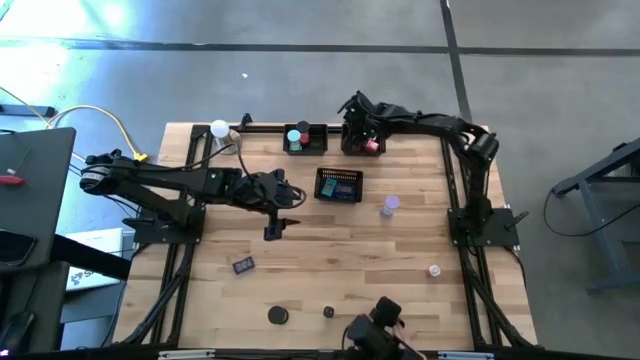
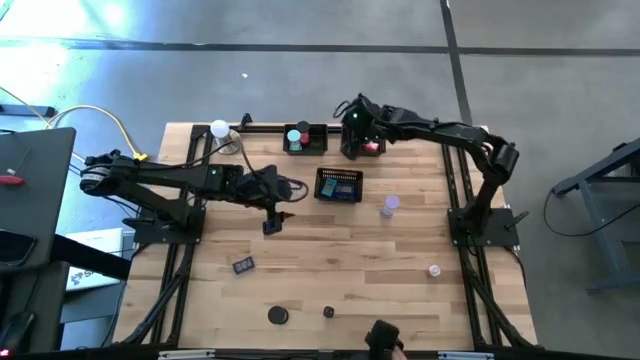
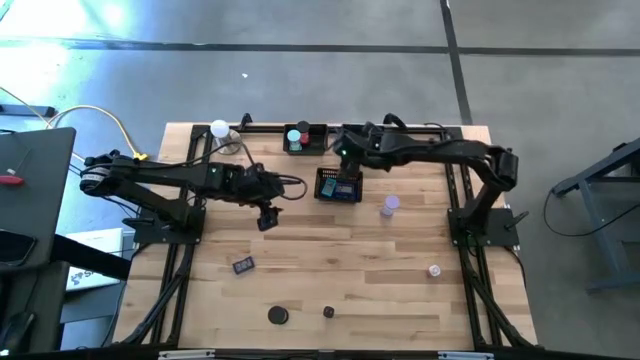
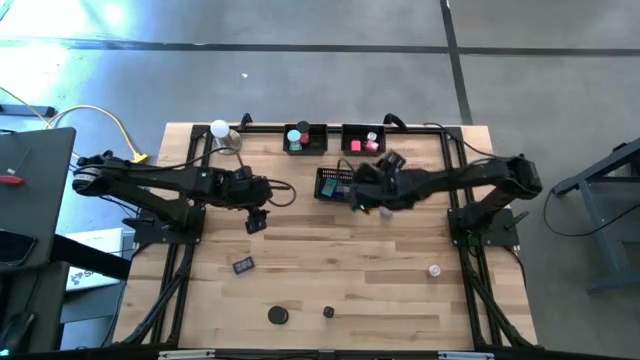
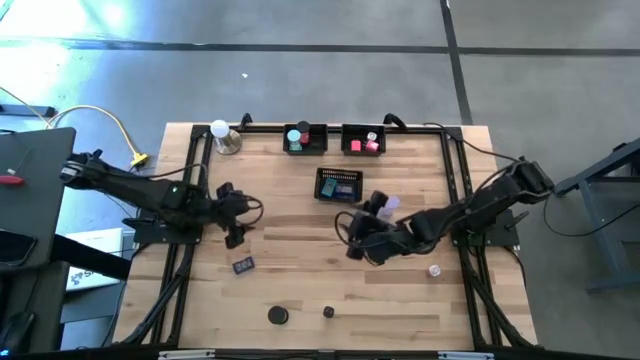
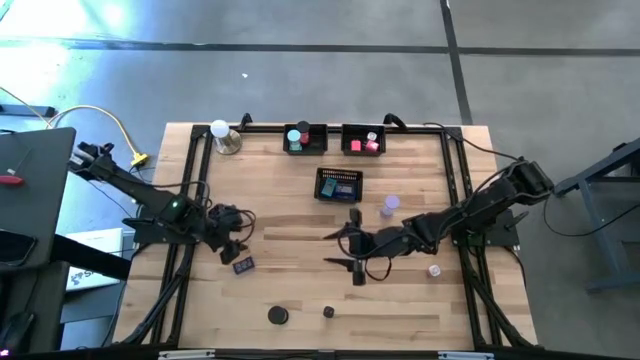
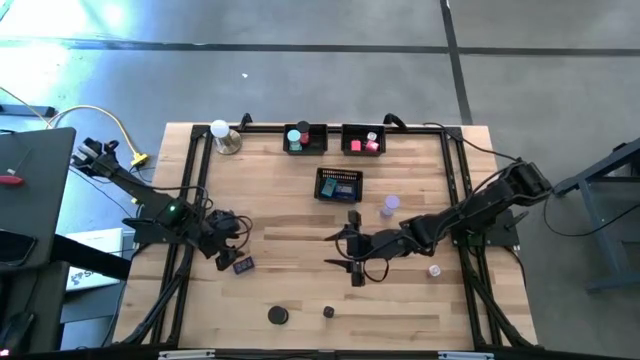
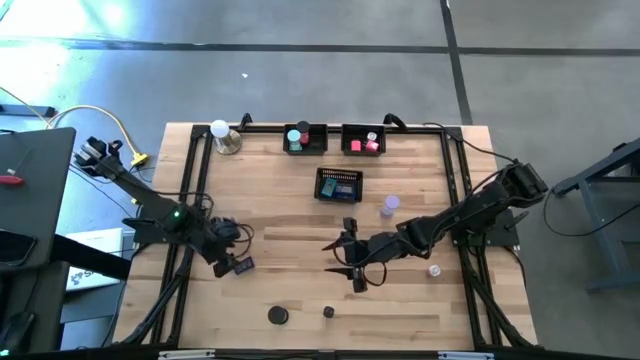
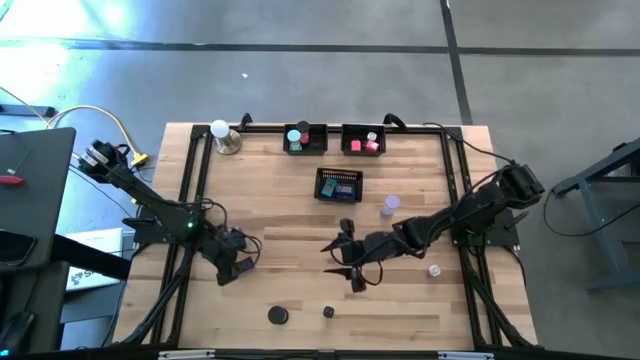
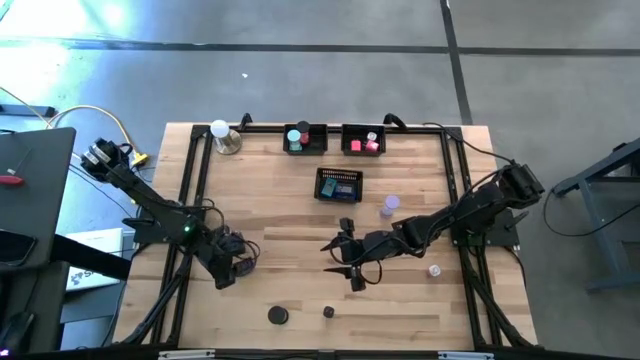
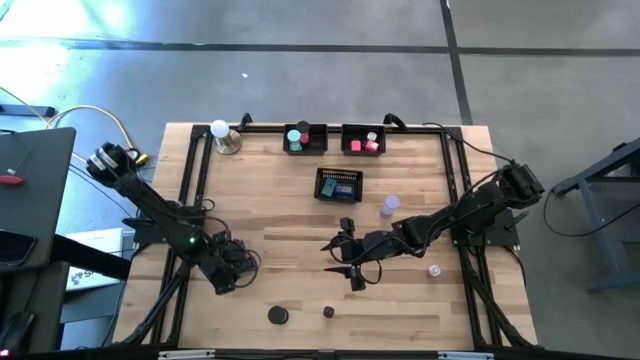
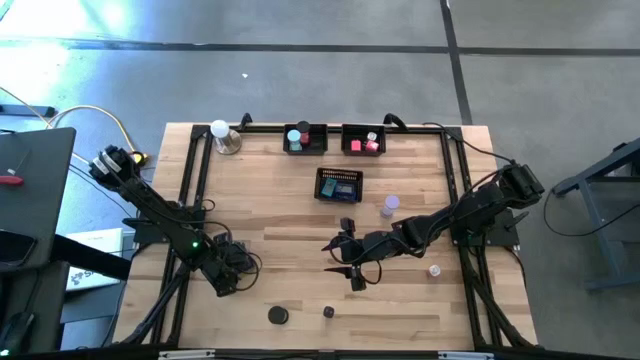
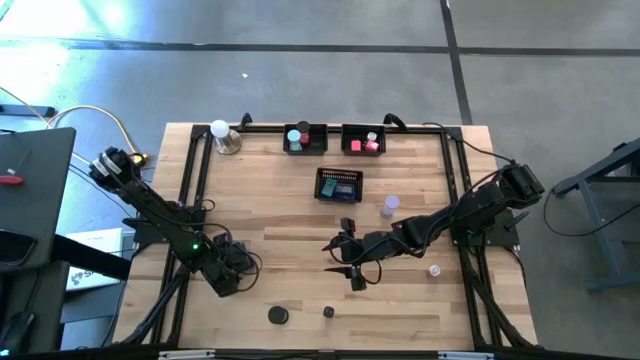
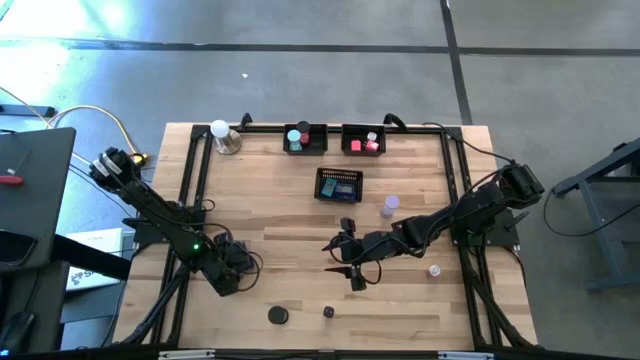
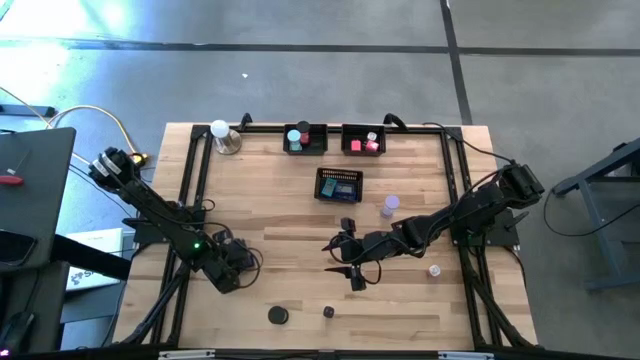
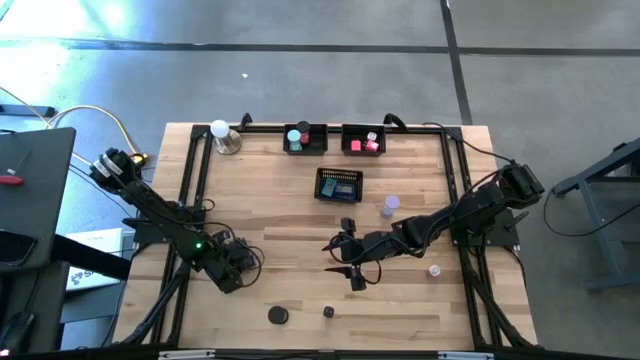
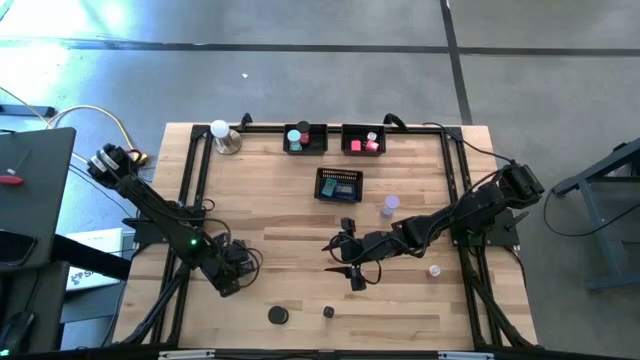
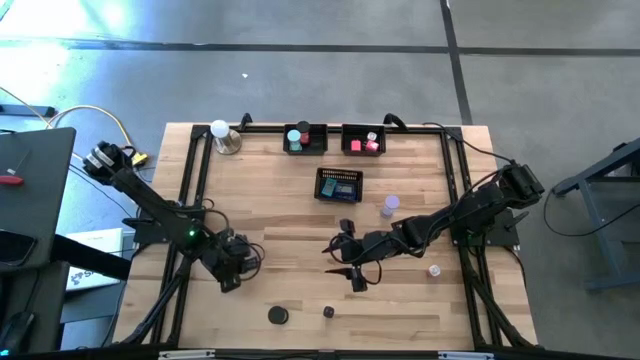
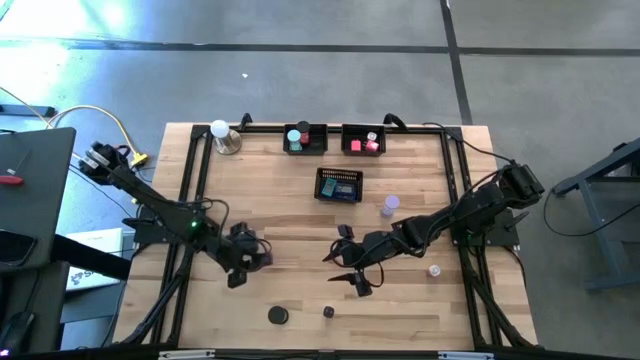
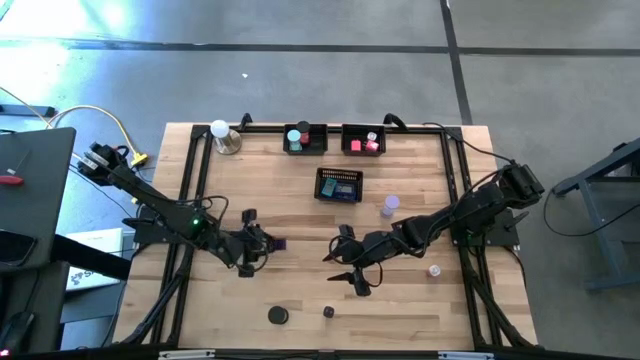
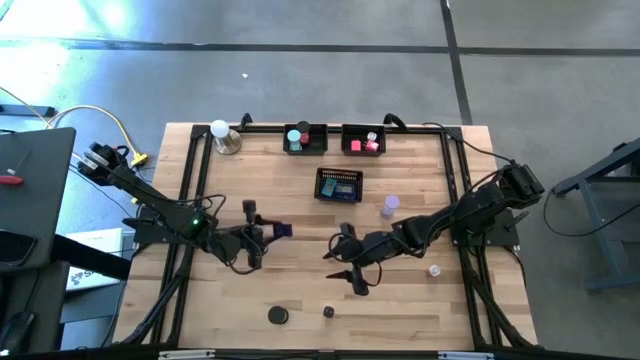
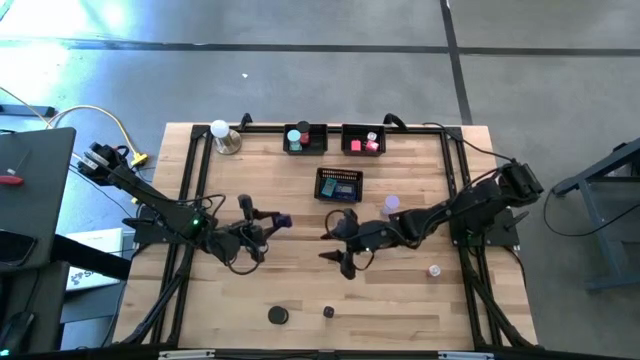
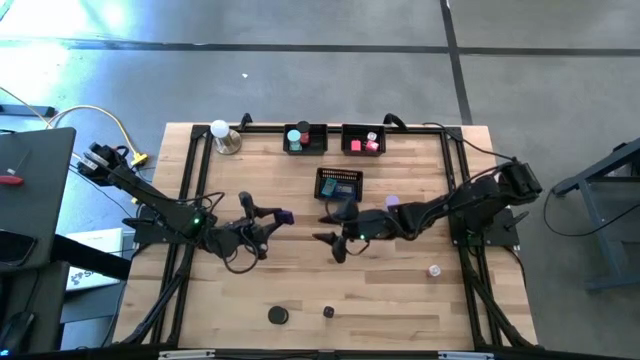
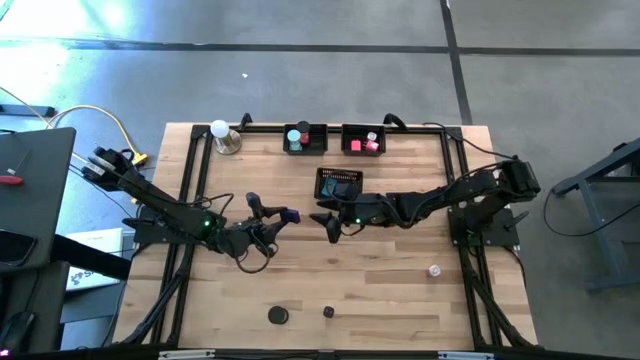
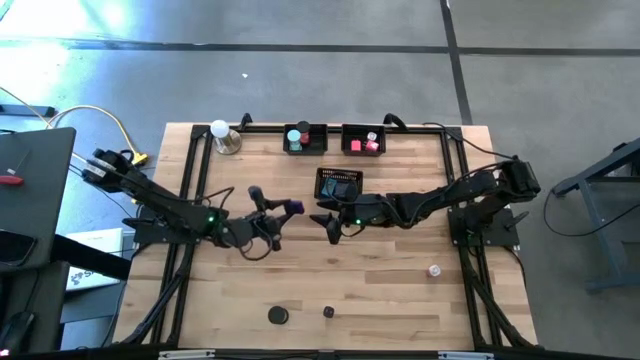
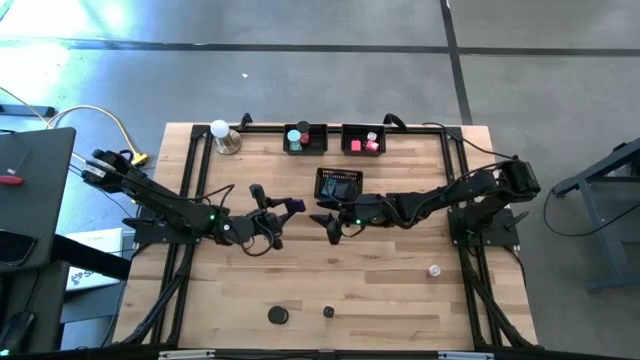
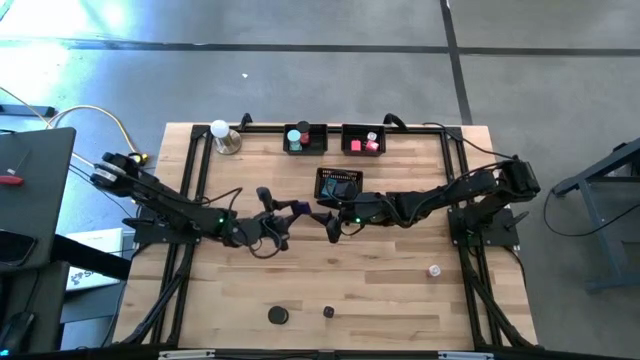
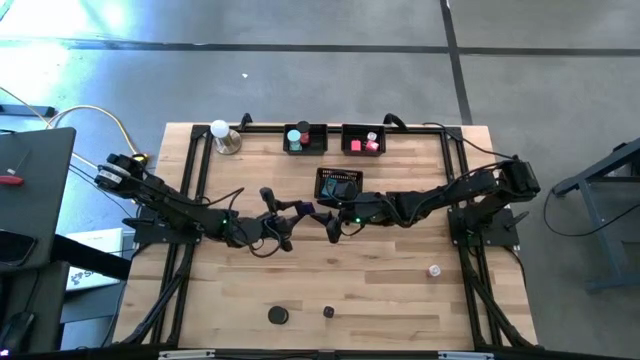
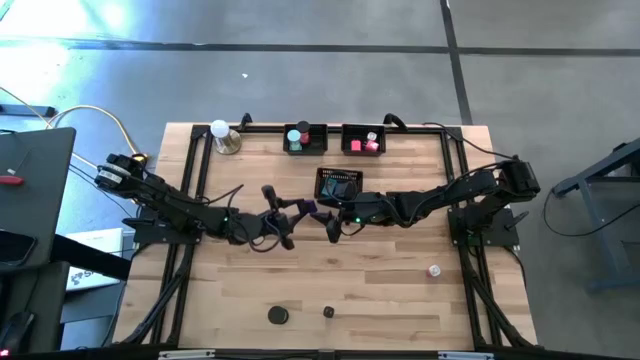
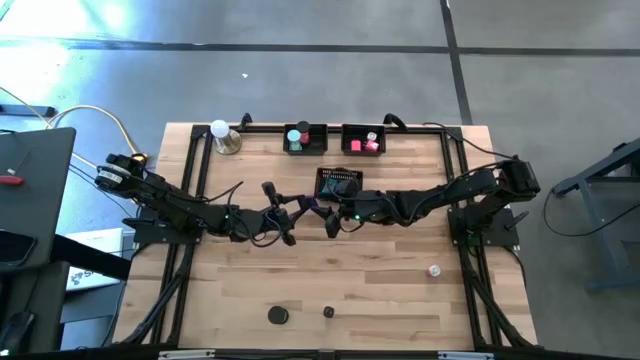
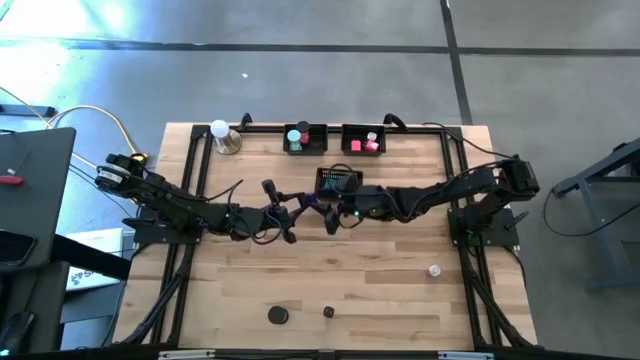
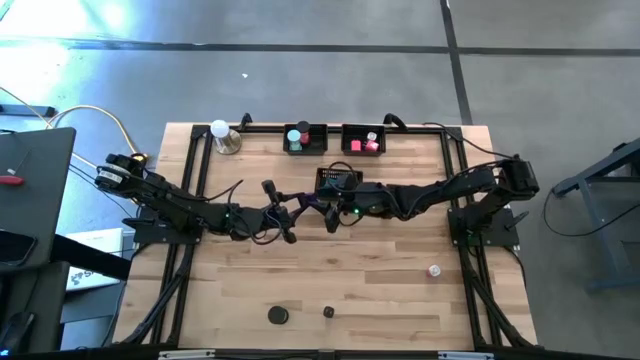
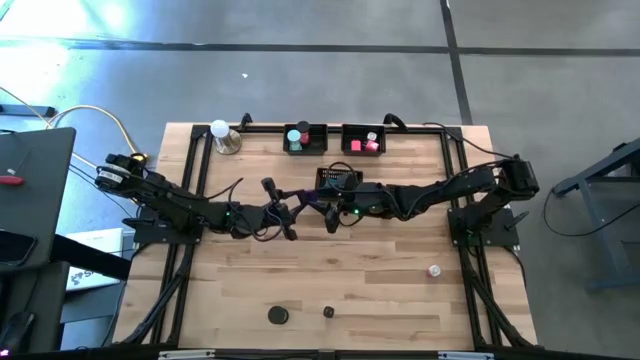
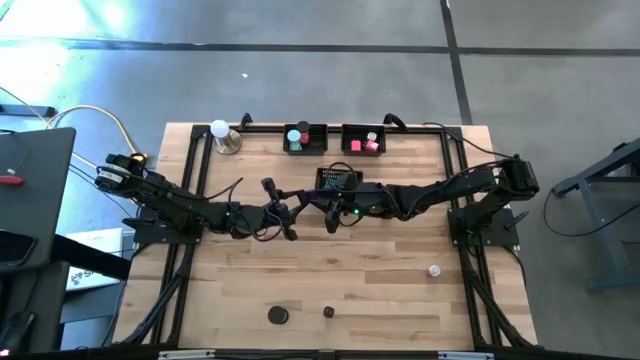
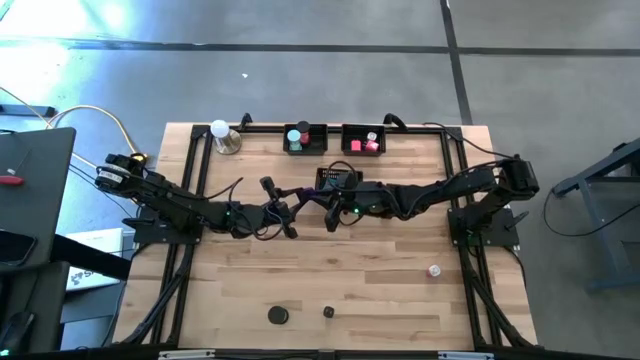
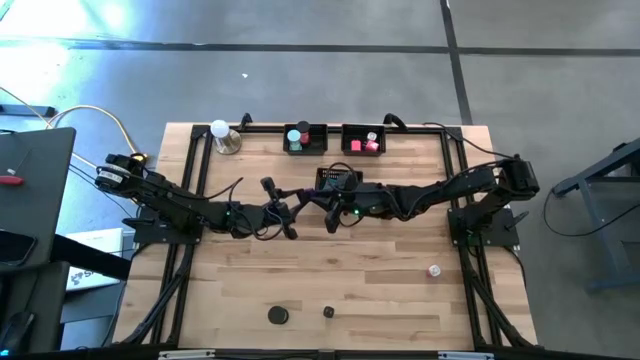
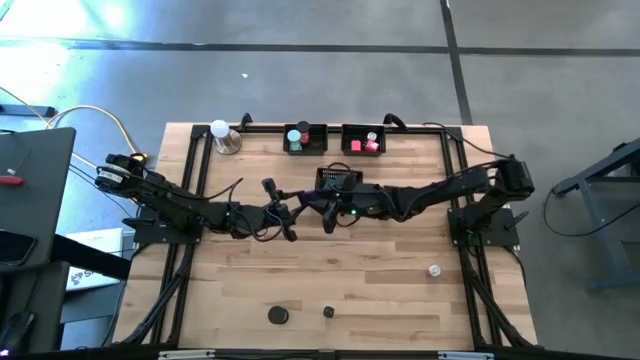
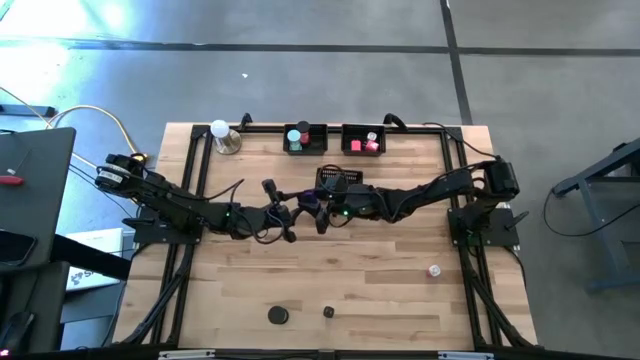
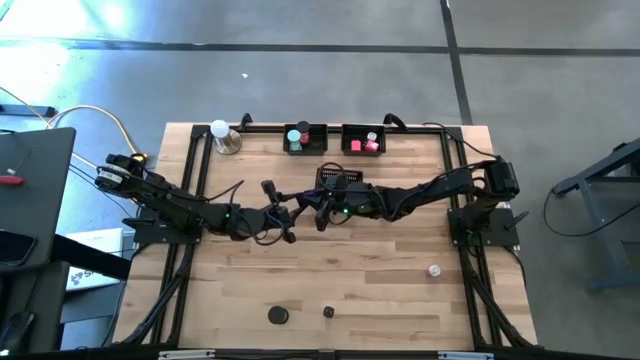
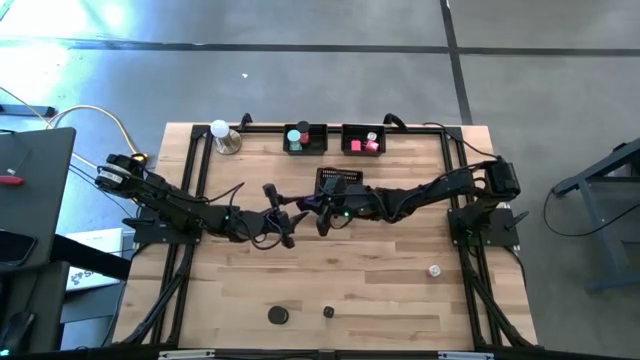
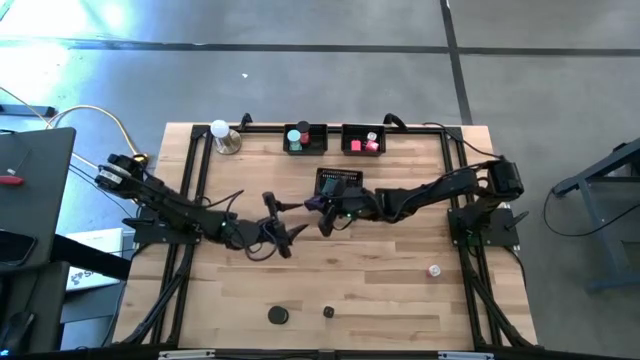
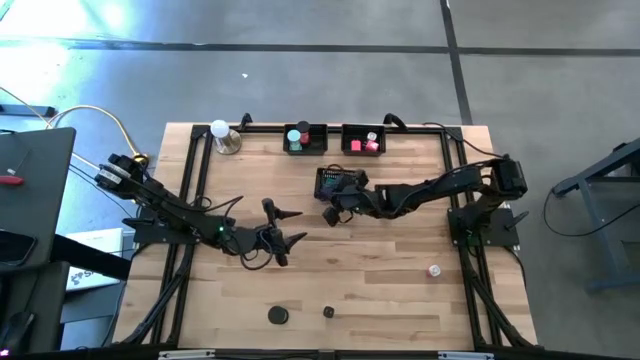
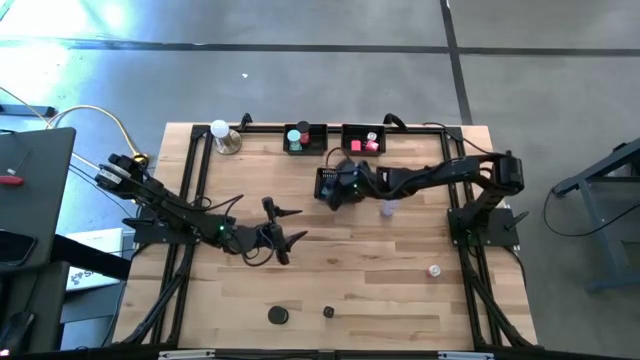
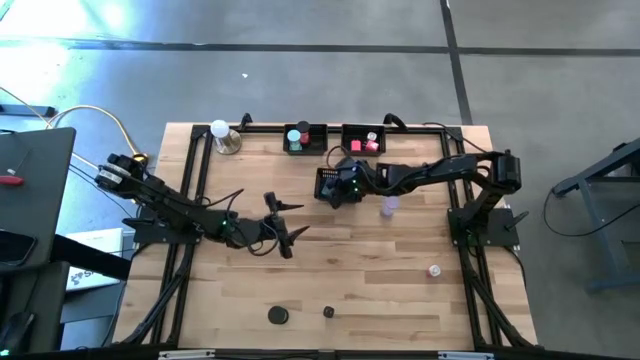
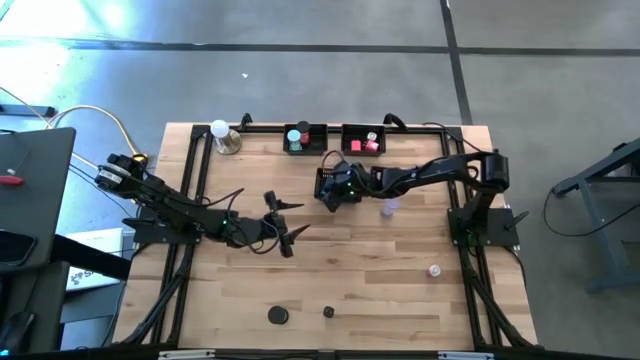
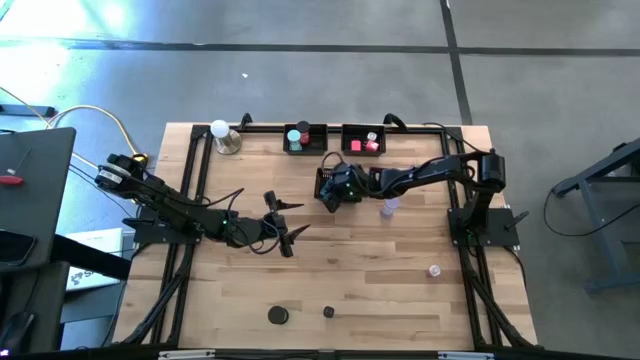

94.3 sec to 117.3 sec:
Task: Pick & Place Office items
Put the blue charger adapter into the top right black bin
